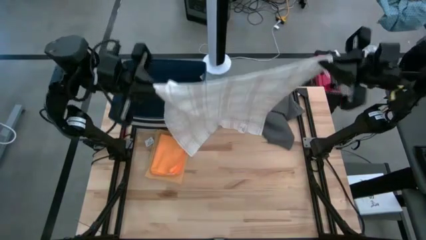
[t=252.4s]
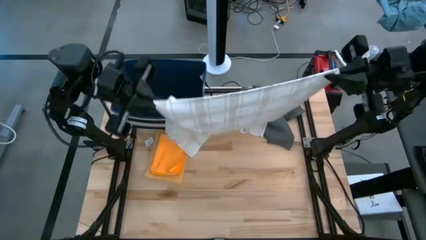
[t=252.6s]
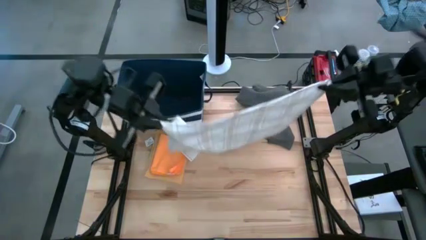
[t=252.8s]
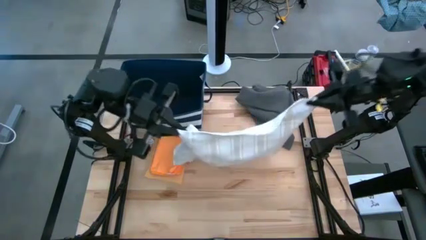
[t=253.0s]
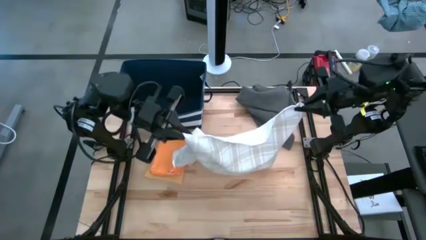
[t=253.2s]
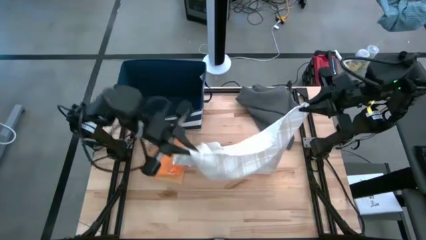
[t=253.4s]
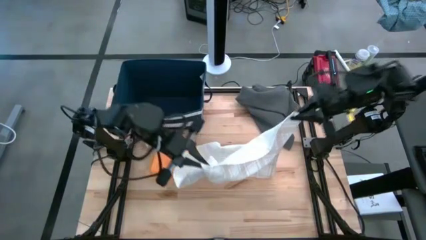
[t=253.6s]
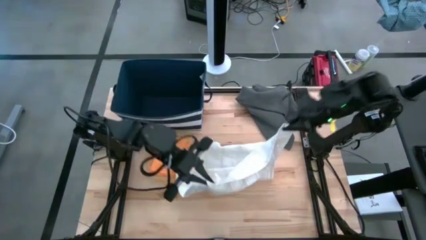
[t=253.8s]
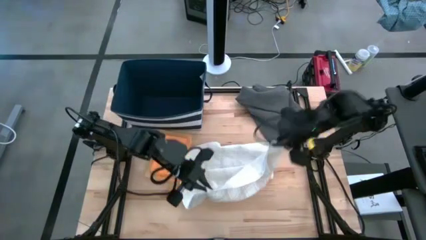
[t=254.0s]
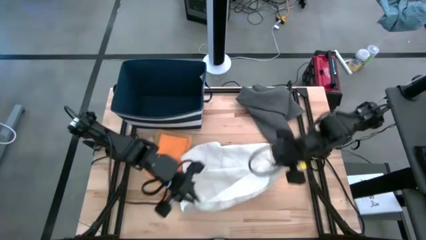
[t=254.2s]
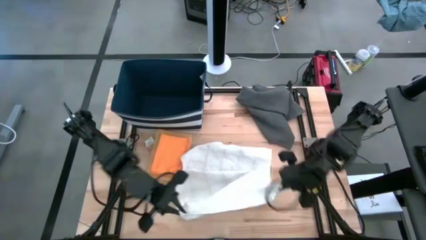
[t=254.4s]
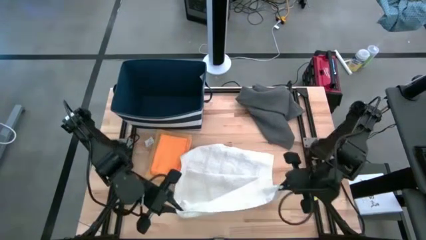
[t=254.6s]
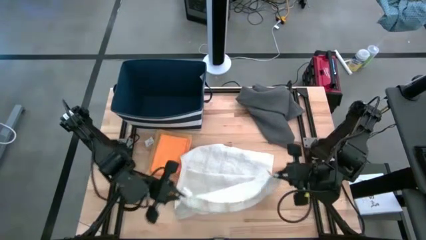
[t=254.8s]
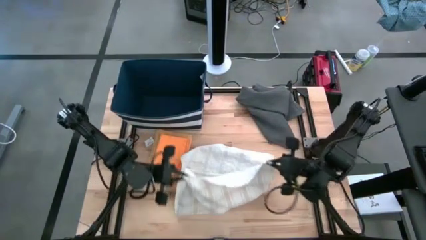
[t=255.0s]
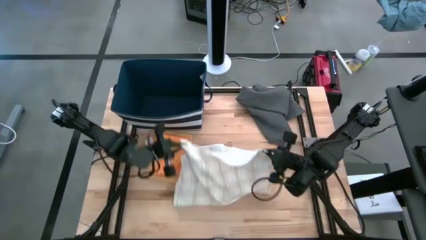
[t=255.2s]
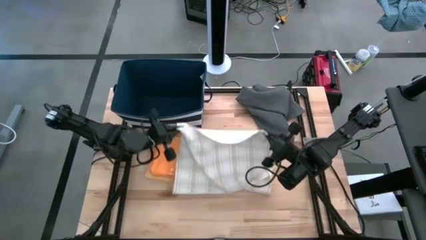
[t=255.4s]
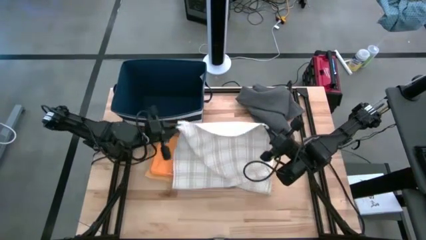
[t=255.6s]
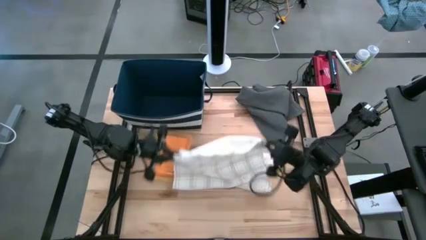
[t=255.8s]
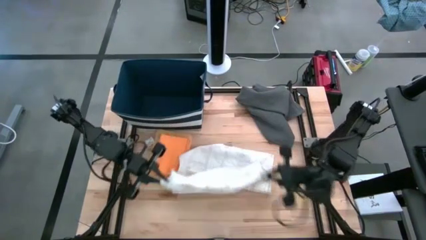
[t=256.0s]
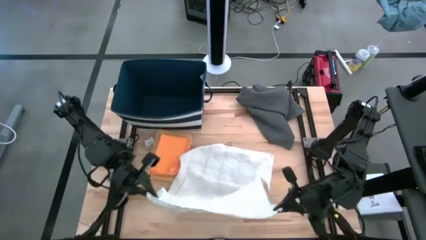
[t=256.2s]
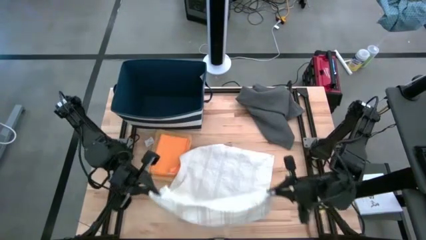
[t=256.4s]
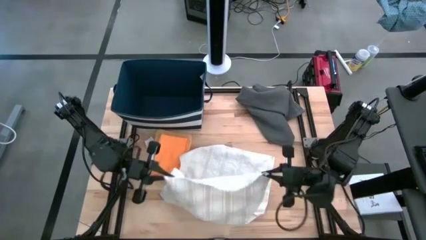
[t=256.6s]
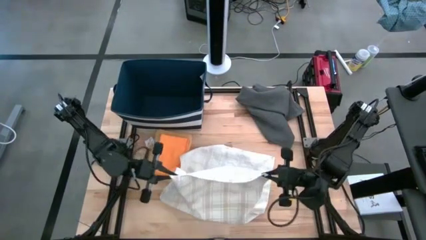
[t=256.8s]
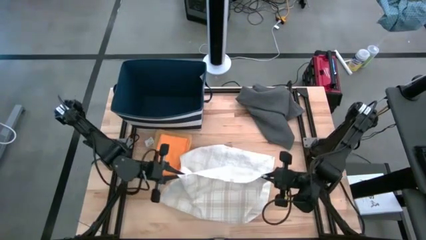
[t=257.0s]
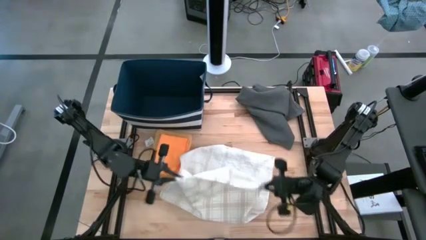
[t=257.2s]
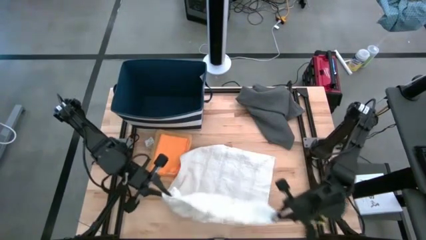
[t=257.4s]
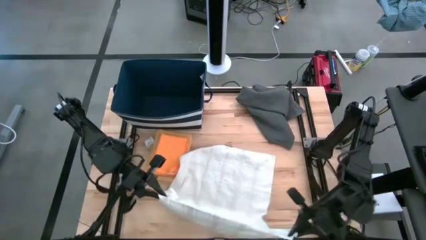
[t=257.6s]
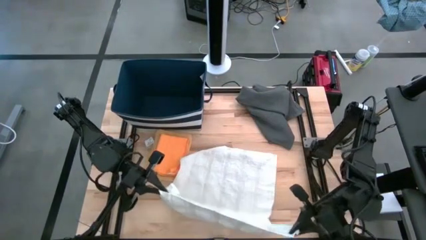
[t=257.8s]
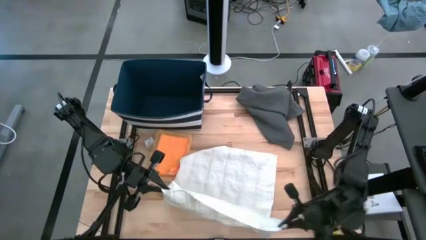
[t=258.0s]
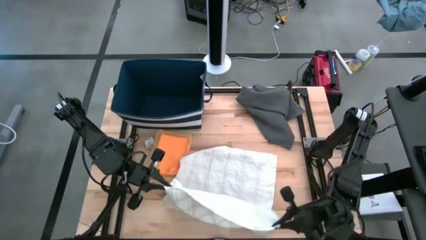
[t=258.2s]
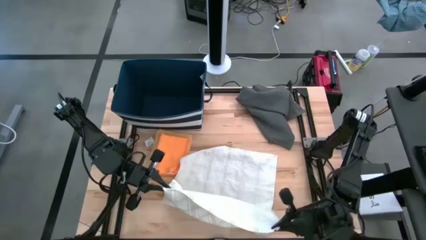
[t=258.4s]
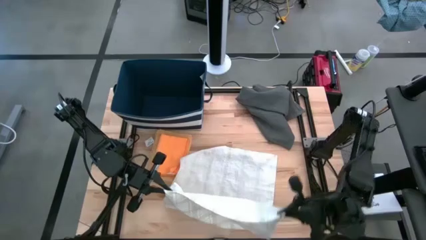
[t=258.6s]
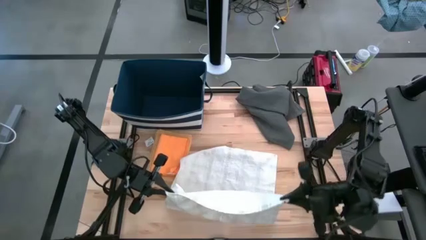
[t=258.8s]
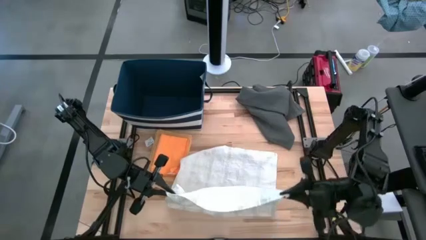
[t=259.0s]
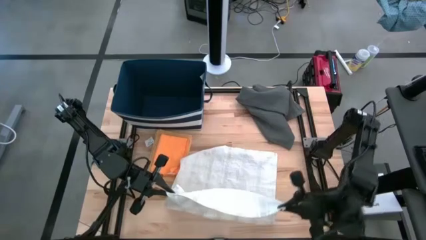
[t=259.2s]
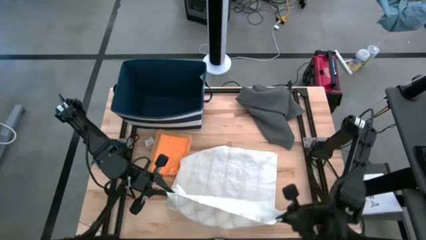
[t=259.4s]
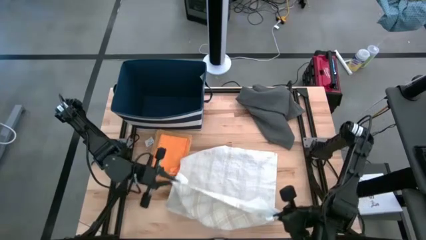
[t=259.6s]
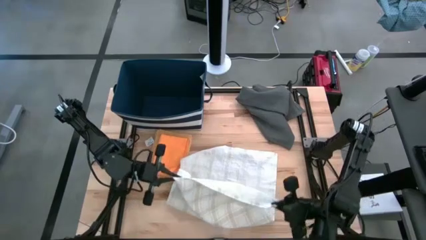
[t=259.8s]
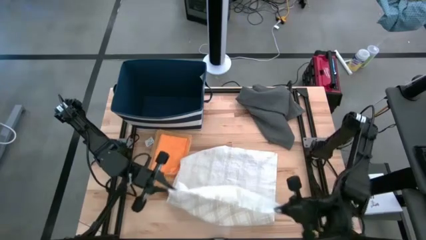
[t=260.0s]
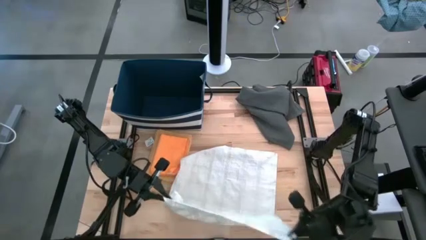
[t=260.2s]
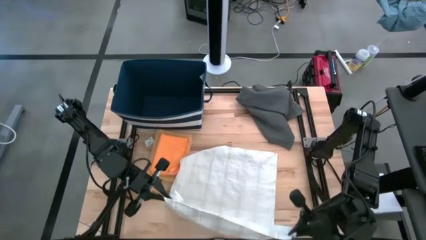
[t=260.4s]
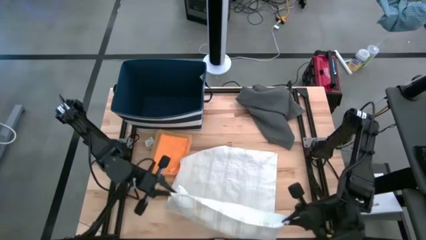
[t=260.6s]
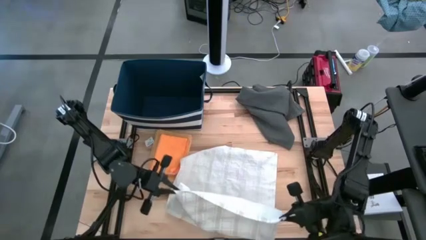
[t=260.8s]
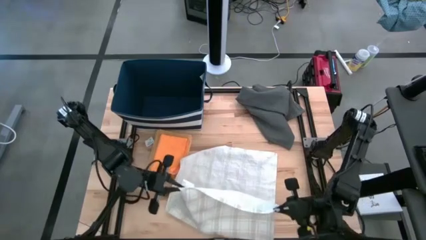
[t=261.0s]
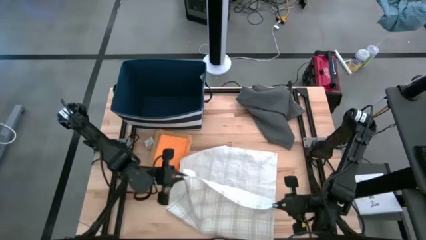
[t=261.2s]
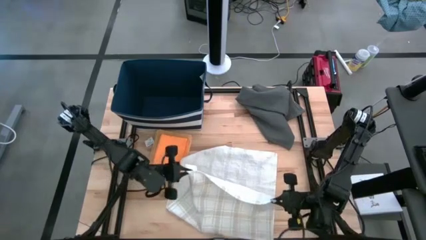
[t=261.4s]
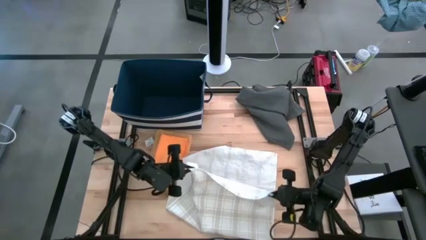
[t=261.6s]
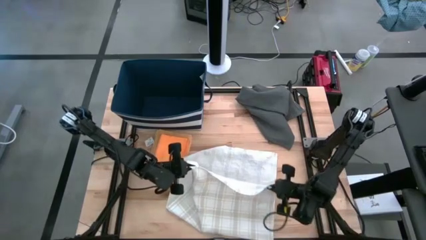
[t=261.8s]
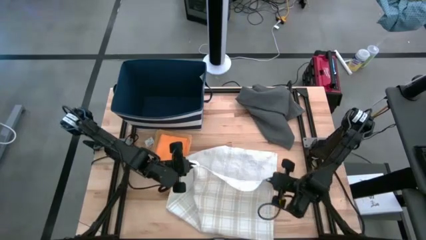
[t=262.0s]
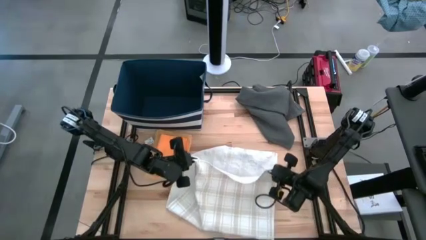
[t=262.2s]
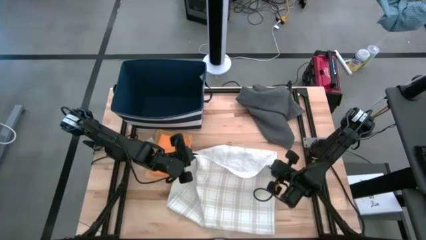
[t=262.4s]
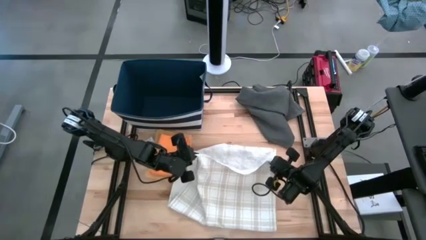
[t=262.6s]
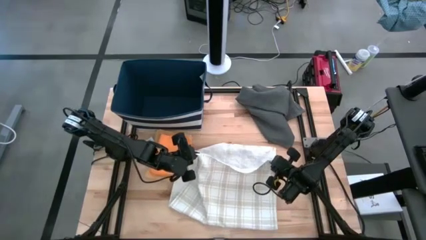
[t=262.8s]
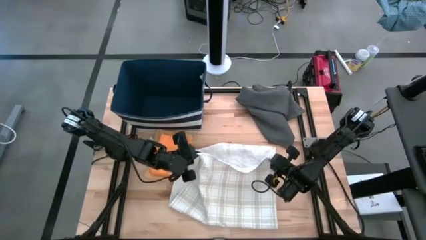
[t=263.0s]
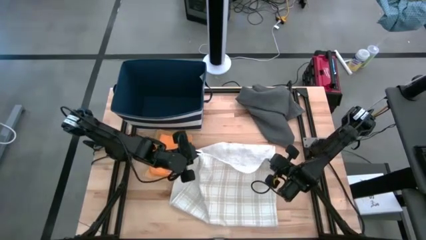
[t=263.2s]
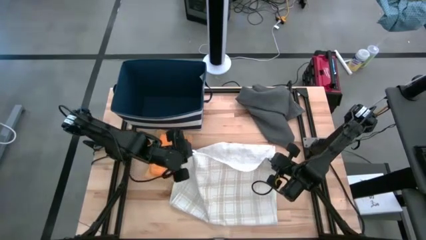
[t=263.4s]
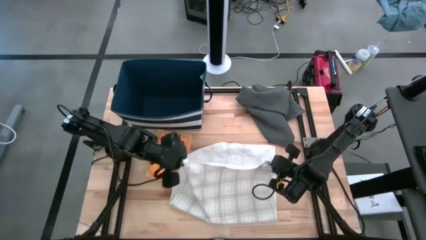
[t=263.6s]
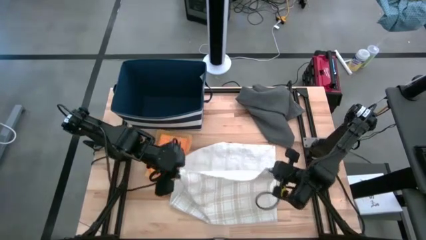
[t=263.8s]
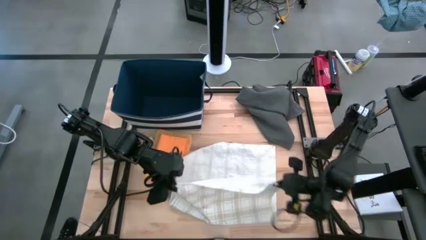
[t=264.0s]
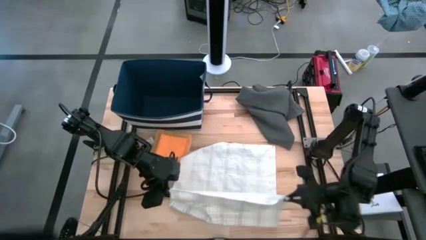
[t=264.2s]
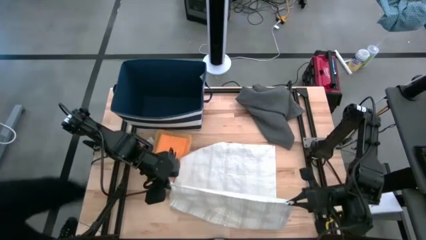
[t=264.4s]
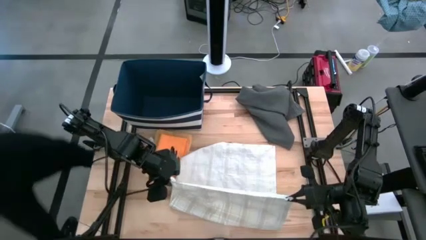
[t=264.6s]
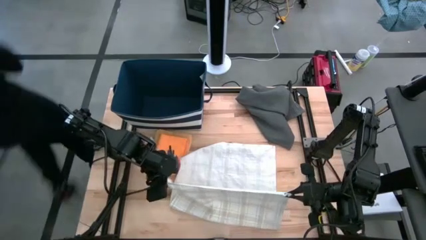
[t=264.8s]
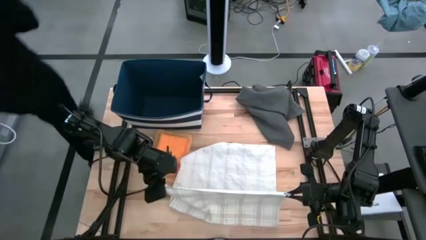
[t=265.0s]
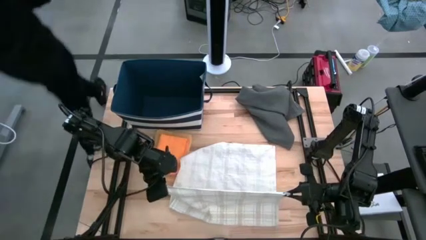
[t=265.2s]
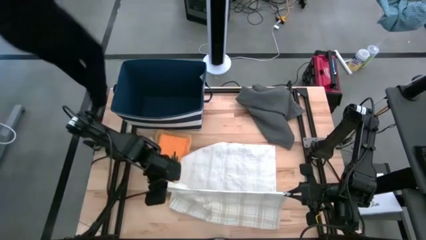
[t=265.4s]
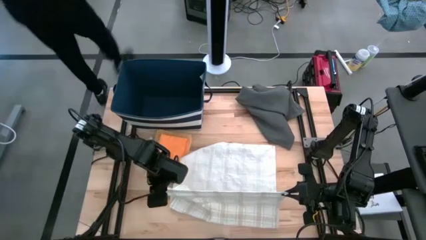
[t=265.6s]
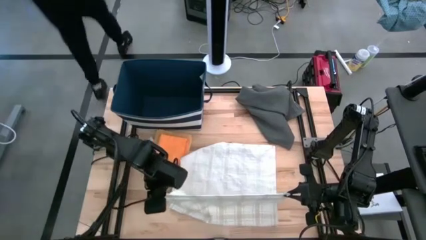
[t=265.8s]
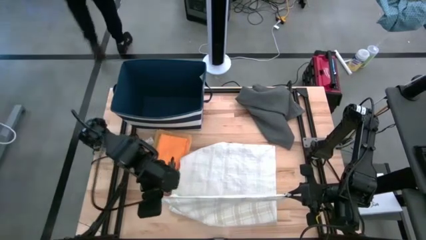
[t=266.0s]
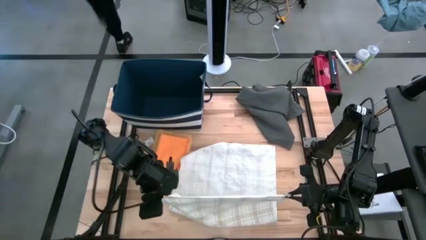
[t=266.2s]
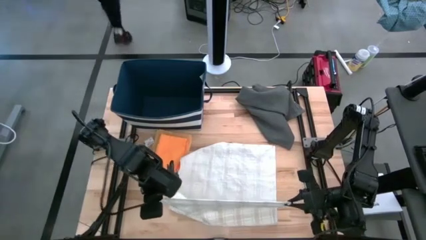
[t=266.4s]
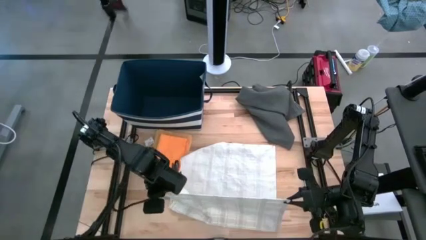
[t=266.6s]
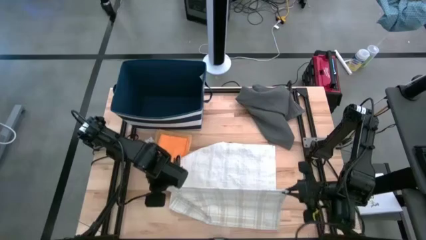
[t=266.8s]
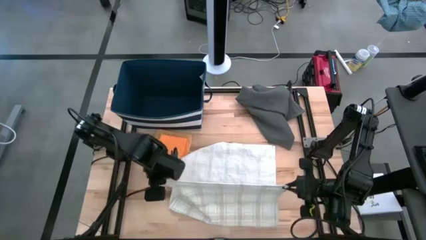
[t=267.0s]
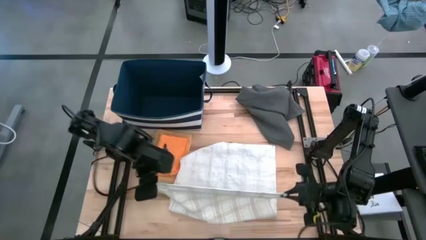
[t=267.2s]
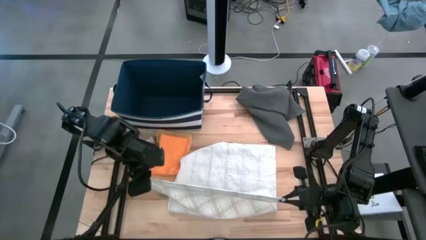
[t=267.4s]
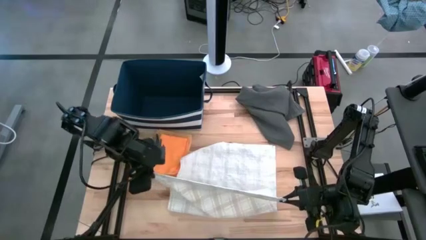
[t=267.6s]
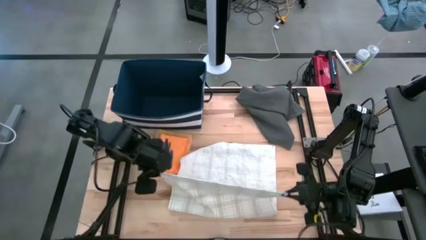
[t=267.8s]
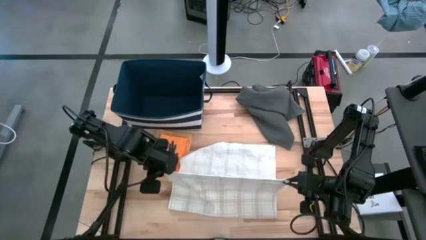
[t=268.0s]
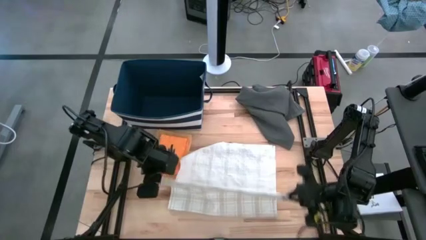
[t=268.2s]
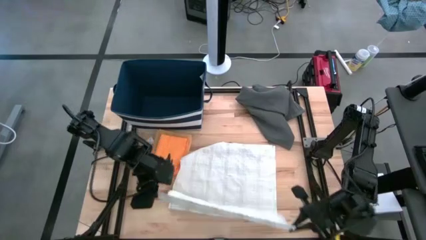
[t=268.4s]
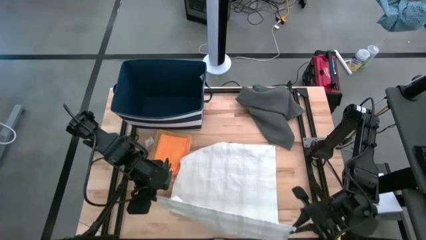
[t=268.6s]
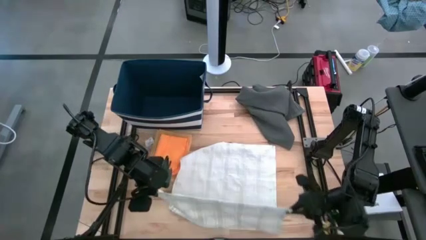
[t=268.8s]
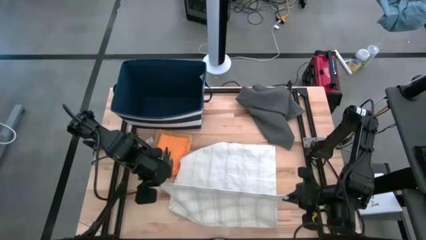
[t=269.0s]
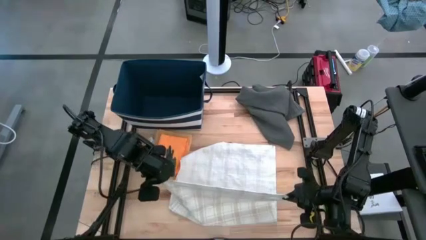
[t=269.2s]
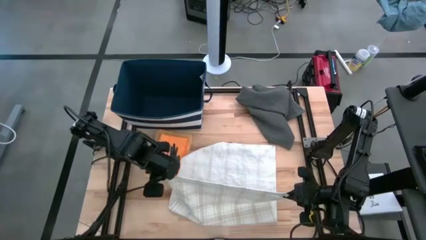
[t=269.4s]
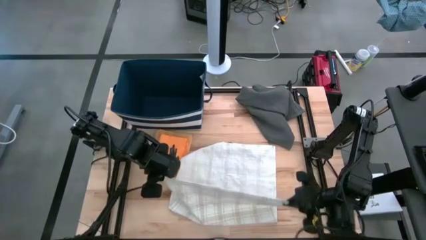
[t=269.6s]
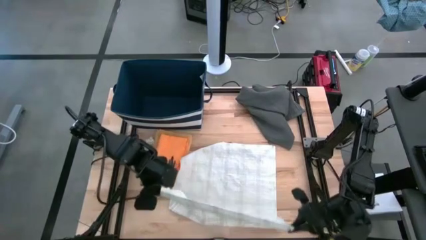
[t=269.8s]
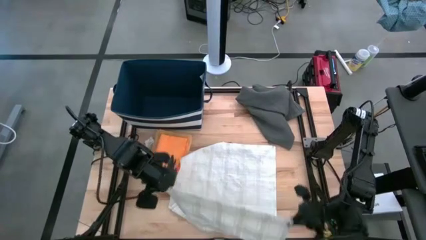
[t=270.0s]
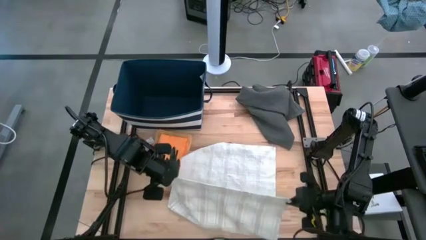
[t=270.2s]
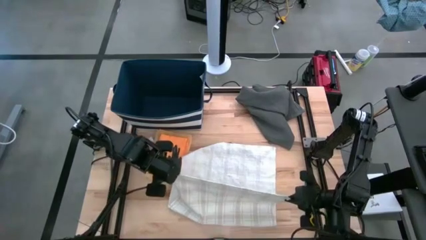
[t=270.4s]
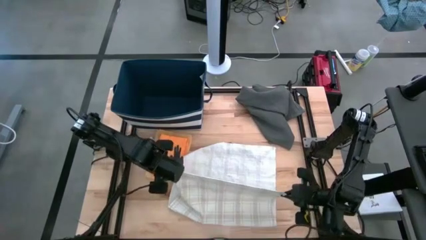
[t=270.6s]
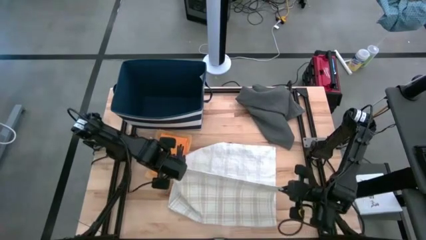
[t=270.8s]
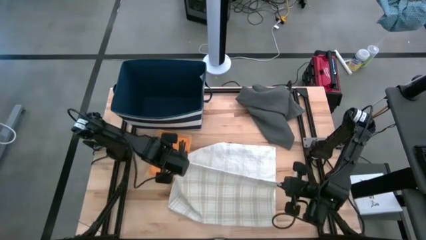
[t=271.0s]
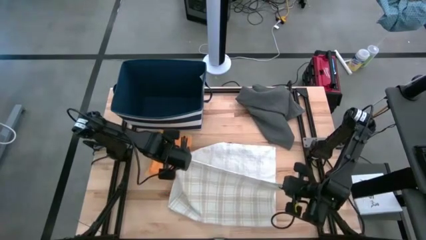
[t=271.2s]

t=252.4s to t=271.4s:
Task: Fold towel
Fold the white patterned kitchen towel
